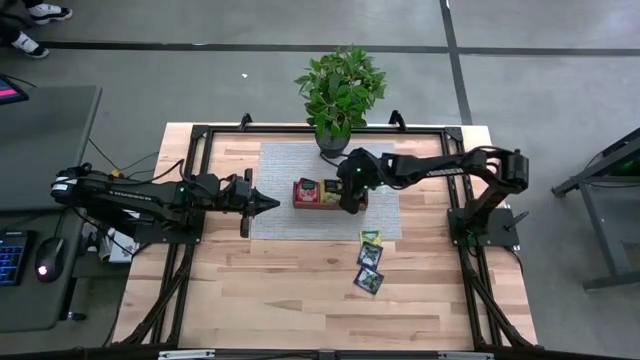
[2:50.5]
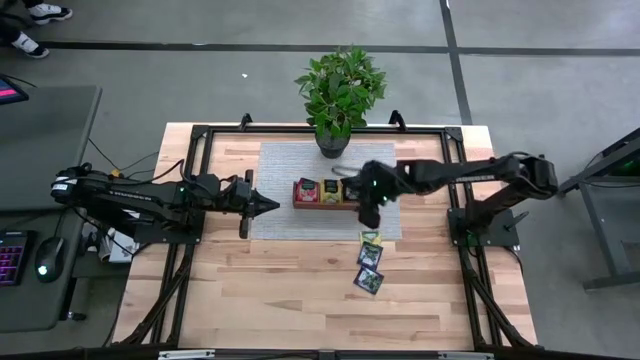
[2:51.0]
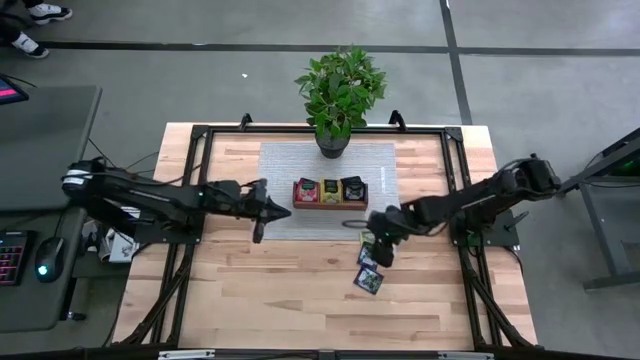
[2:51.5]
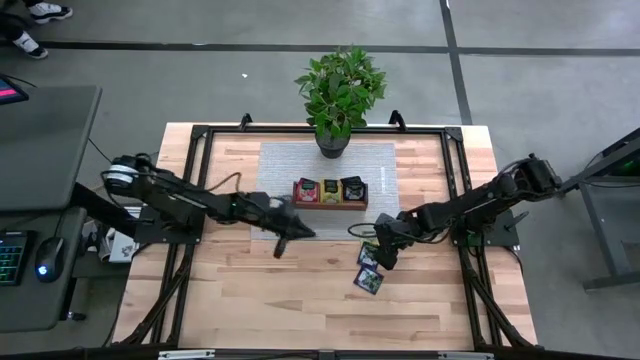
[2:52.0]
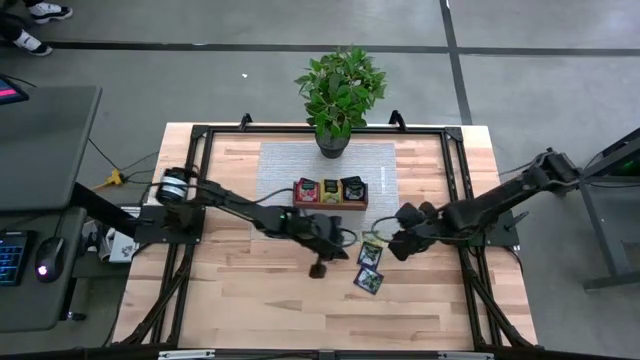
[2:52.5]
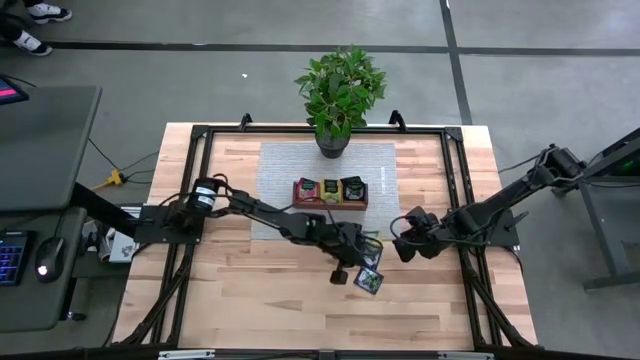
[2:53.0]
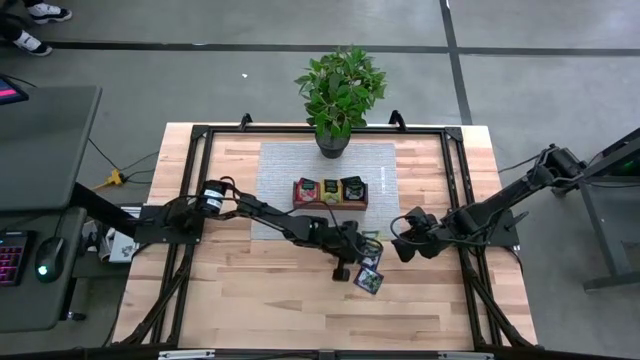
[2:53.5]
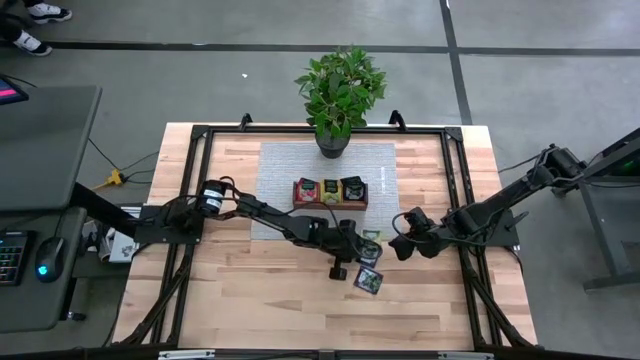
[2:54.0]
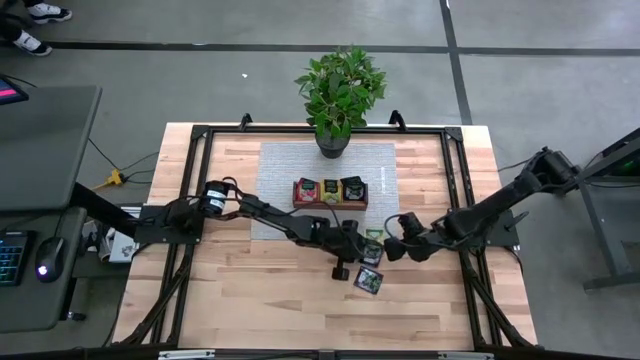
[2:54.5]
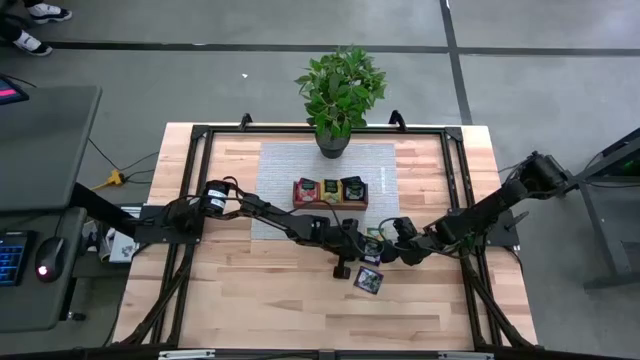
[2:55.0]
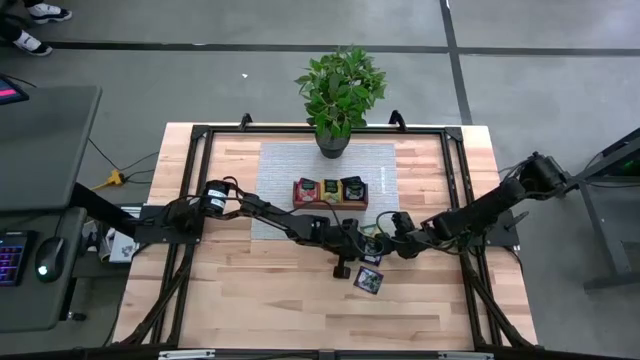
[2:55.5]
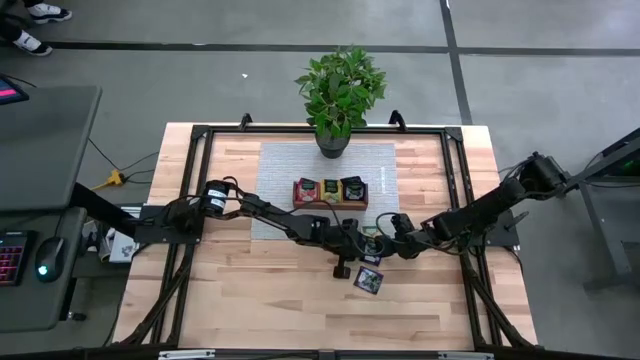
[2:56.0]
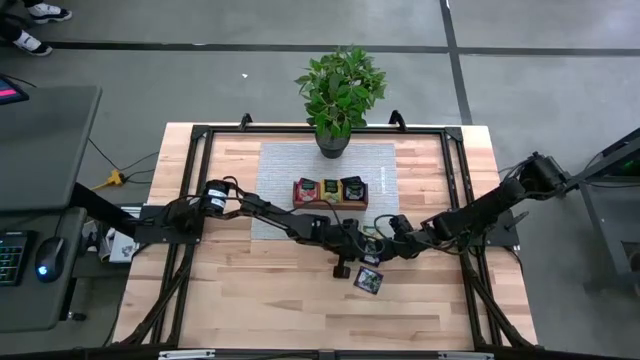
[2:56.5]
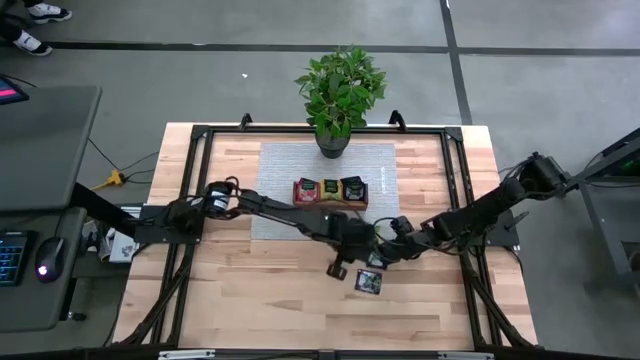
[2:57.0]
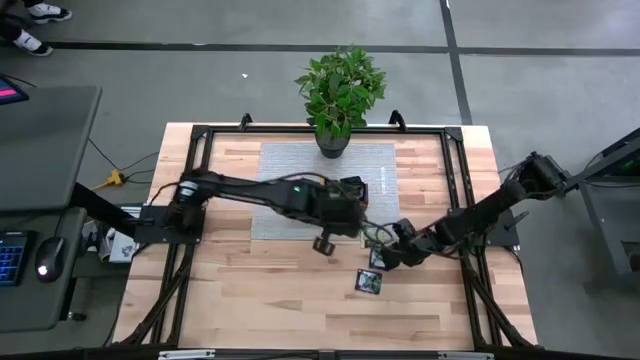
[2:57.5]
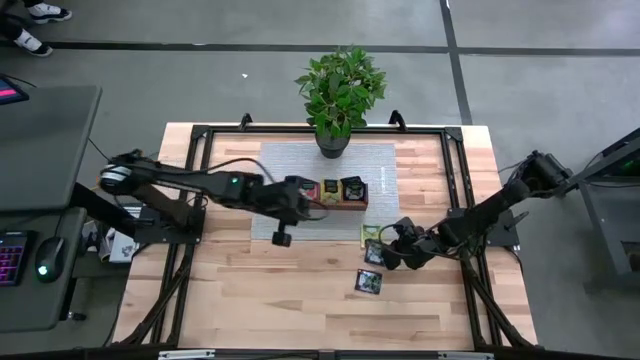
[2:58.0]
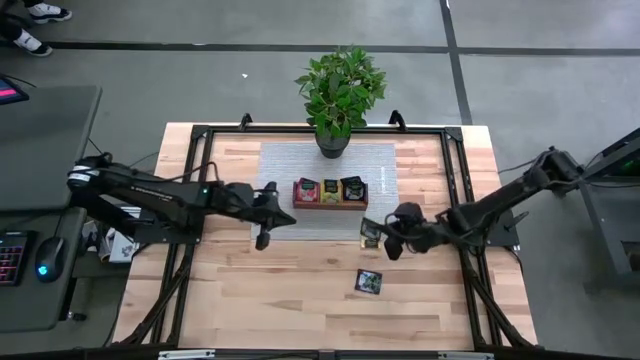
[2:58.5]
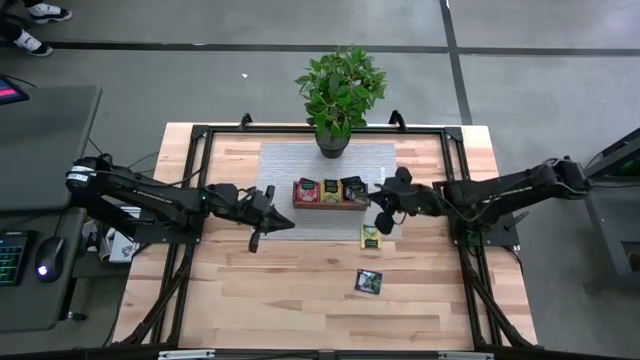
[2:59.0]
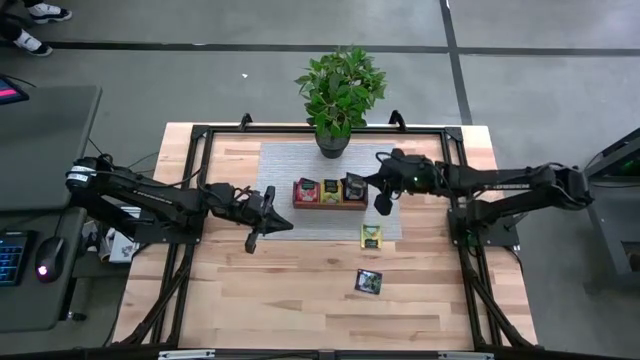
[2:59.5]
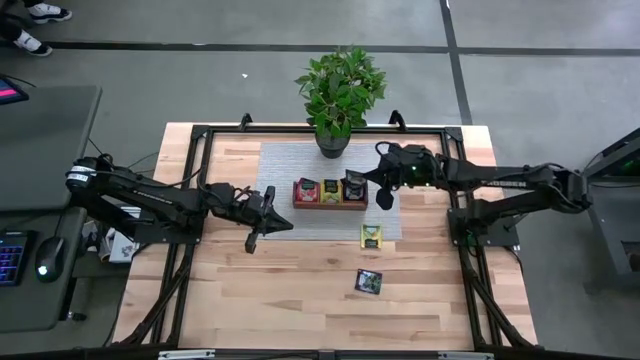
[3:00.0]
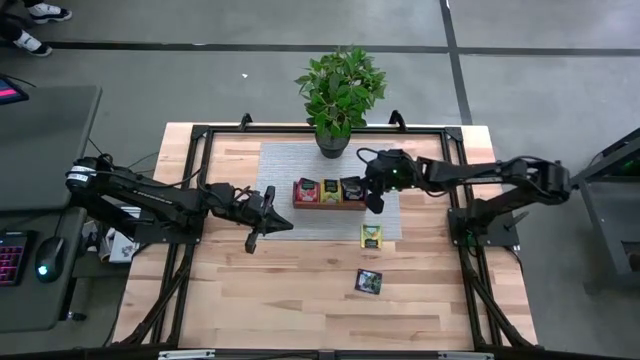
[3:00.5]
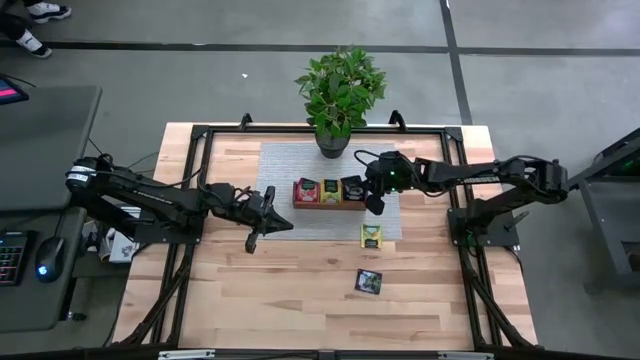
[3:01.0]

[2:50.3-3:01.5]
Task: Pick & Place Tea
Put the violet tea bag into the right section of the wooden organizer

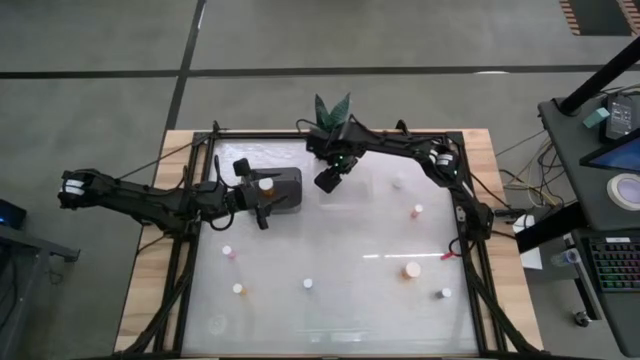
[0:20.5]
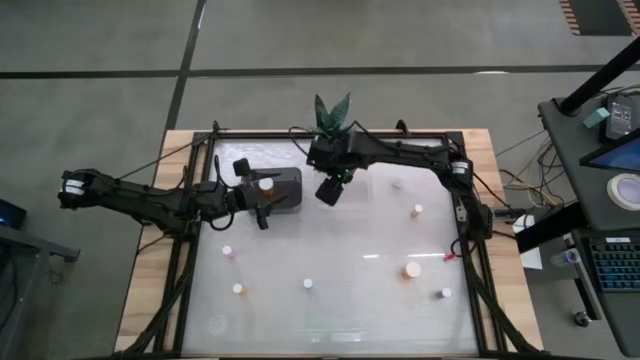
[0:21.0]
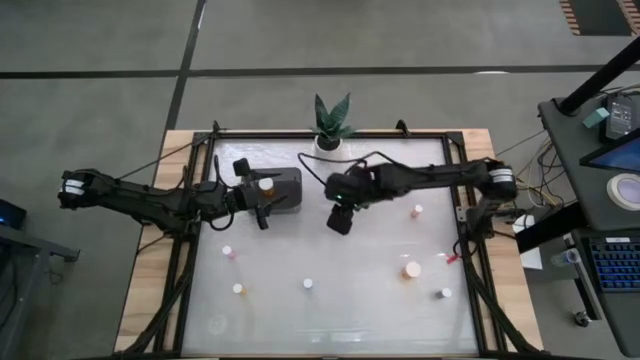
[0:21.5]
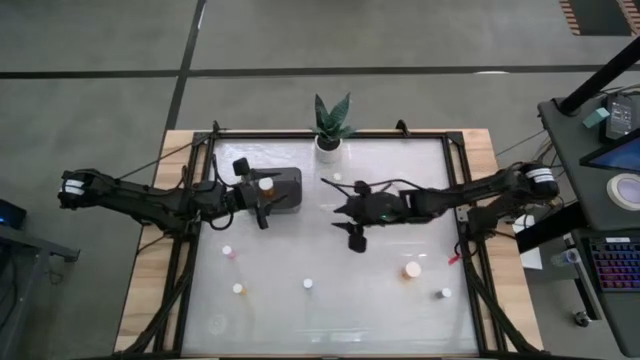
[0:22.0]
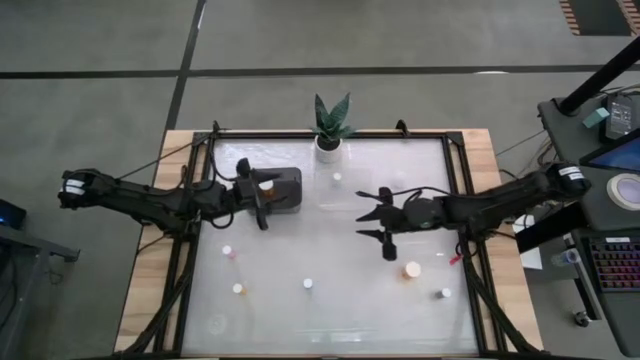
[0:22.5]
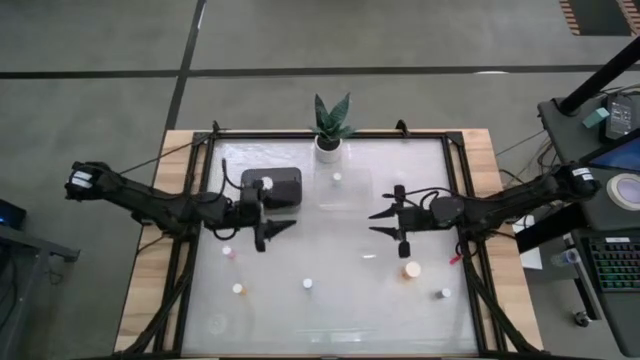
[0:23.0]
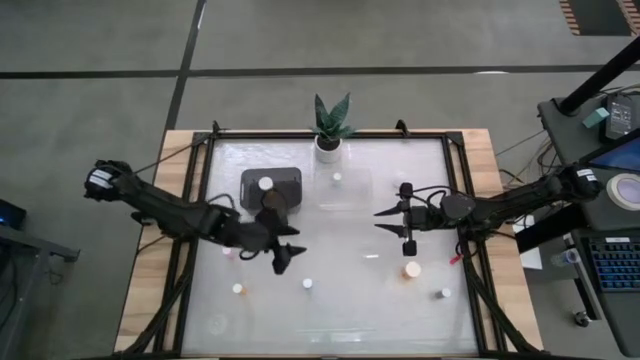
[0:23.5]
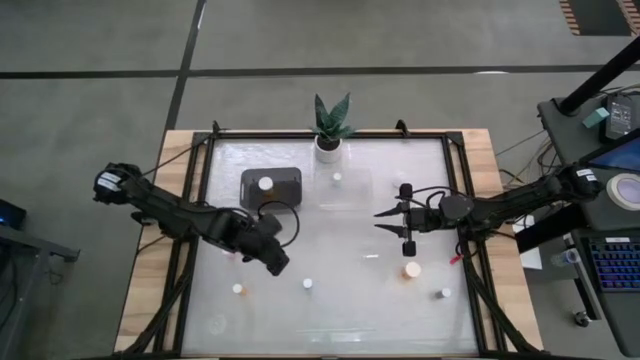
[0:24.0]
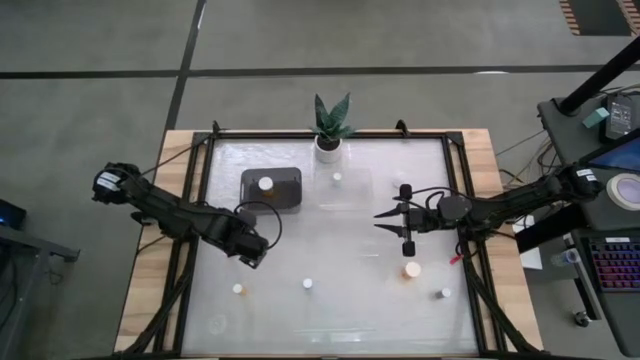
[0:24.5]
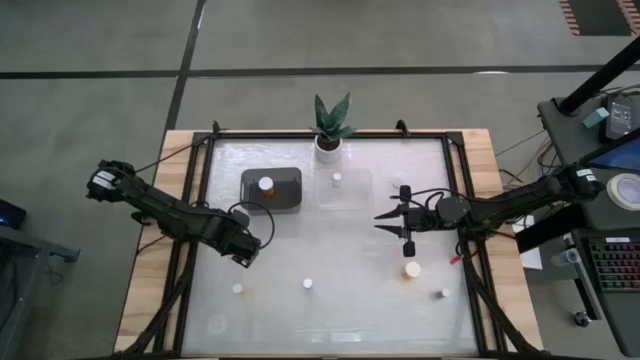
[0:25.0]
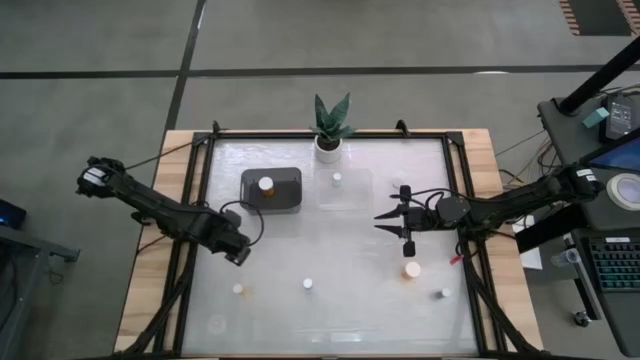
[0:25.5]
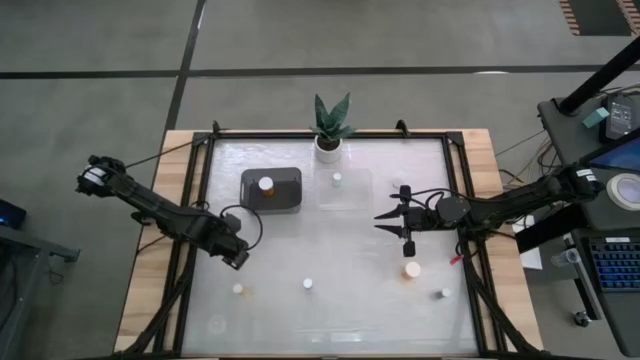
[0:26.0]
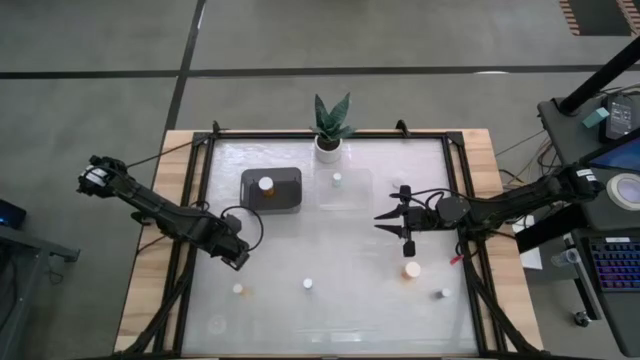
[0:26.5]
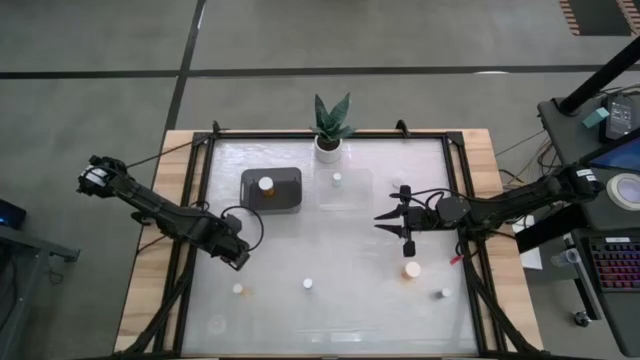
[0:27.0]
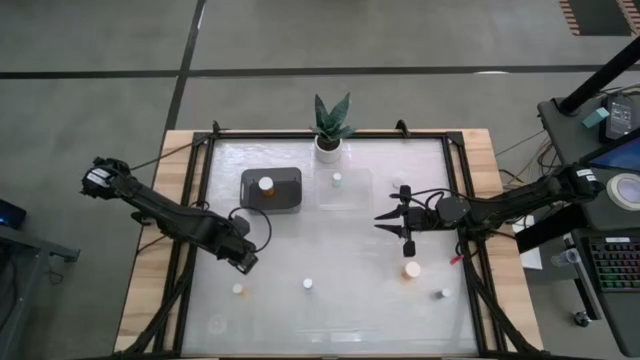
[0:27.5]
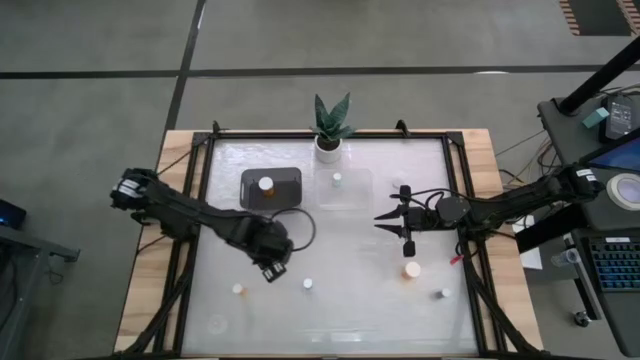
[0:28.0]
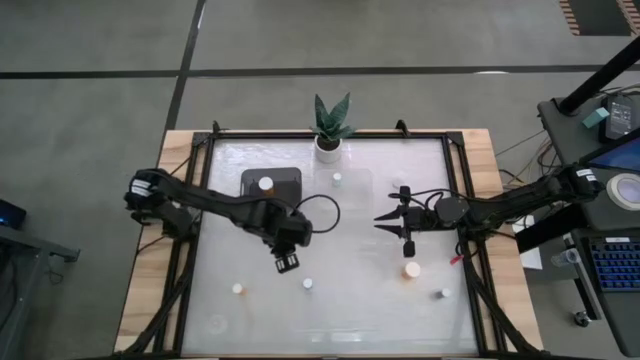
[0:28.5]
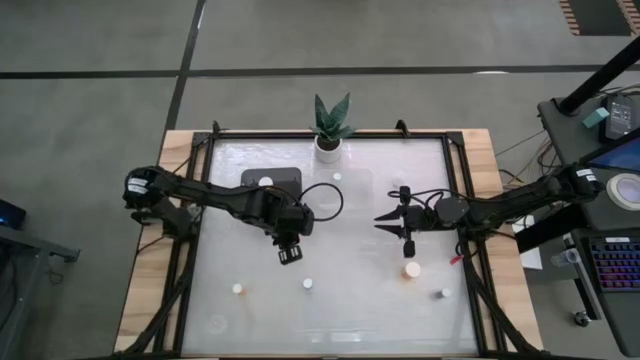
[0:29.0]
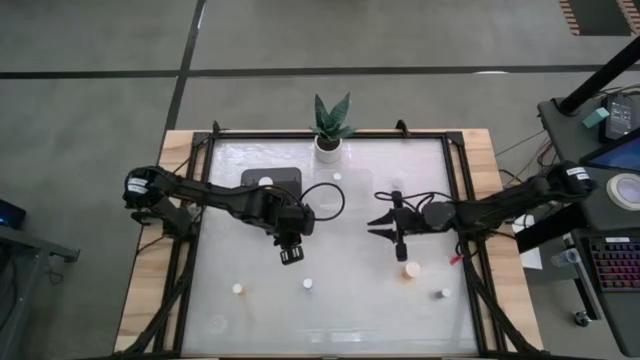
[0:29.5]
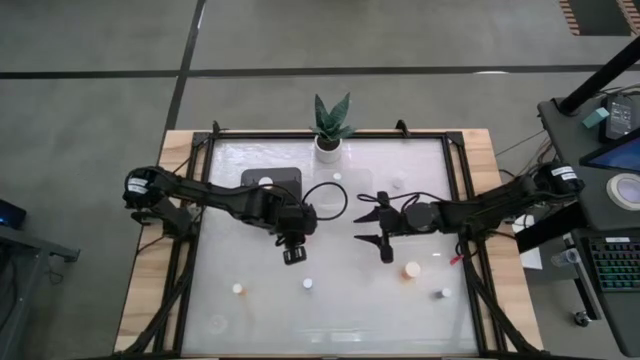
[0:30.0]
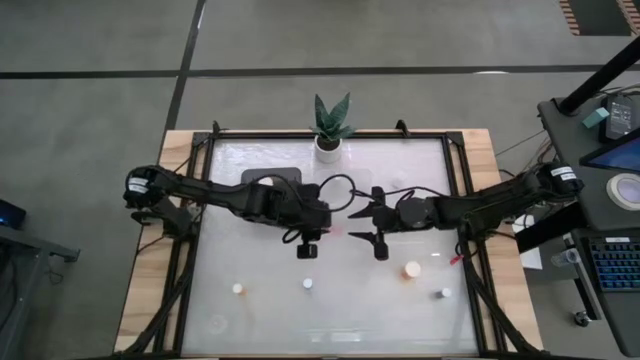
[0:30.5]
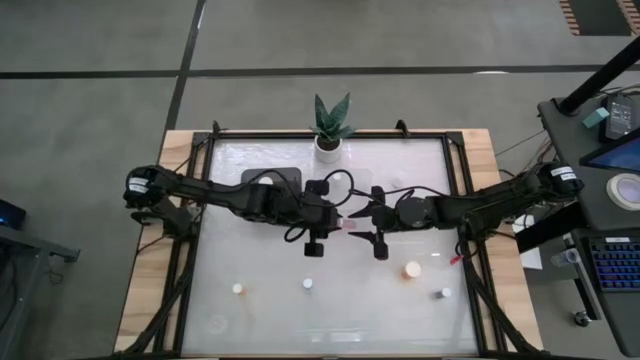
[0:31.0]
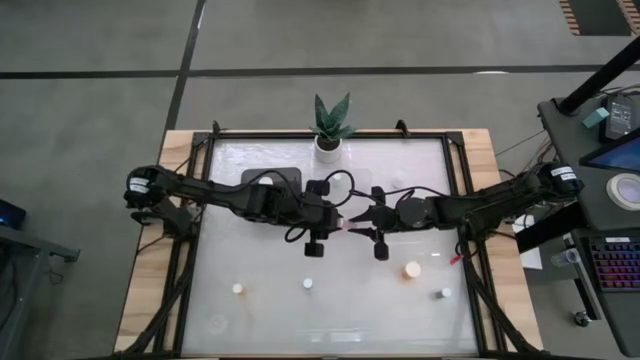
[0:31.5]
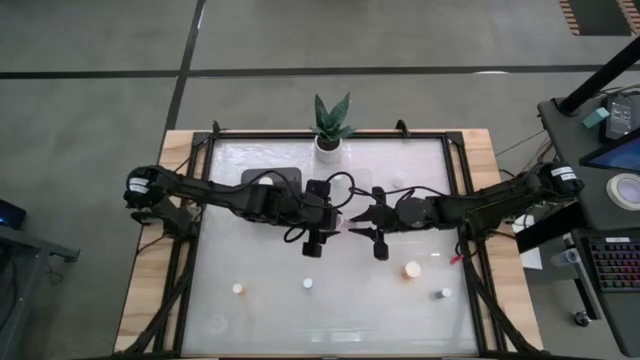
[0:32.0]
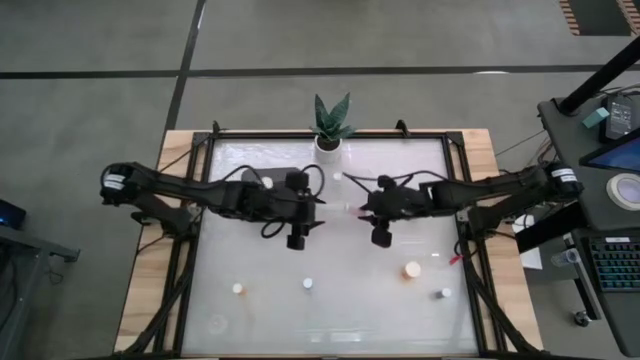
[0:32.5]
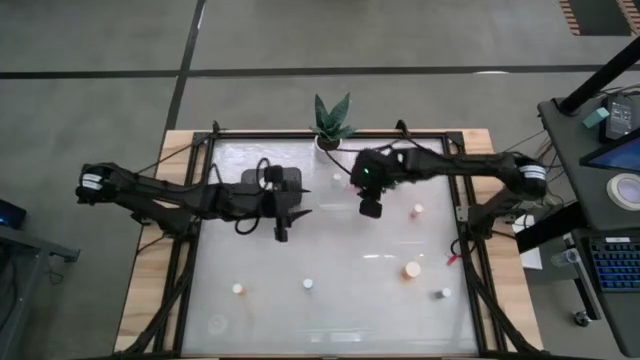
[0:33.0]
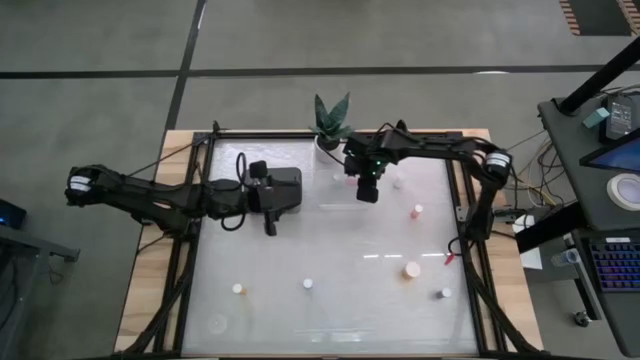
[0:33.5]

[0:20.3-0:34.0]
Task: Pick and place medicine bottles into bin by pill shape (circle, oval)
Put the pink tablet bottle into the transparent bin
